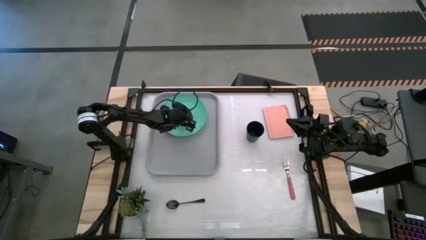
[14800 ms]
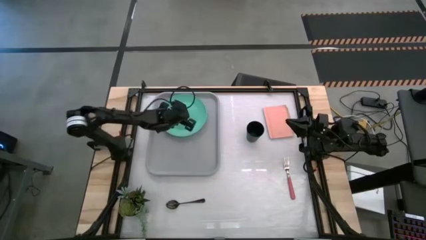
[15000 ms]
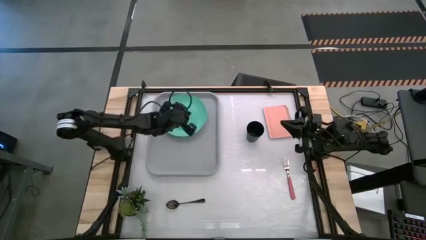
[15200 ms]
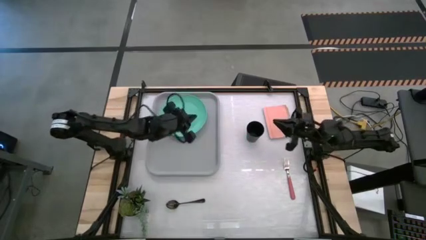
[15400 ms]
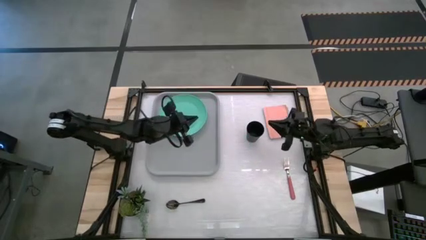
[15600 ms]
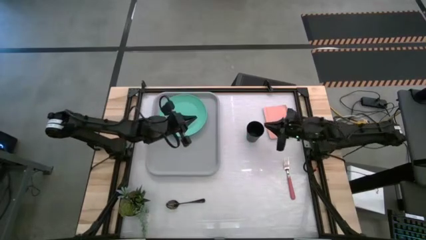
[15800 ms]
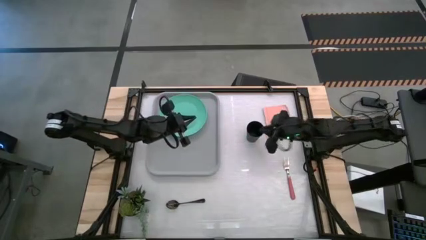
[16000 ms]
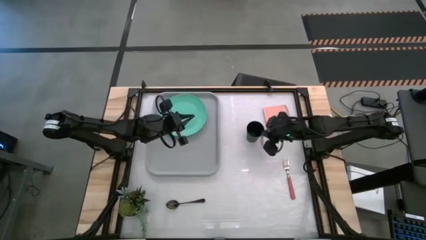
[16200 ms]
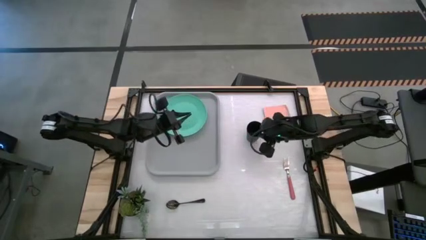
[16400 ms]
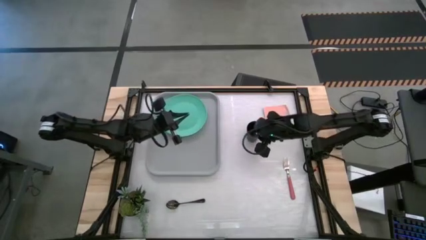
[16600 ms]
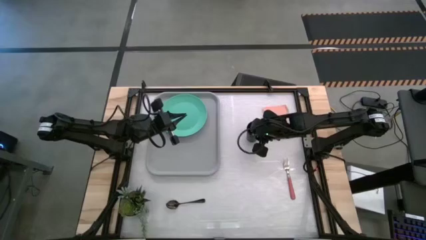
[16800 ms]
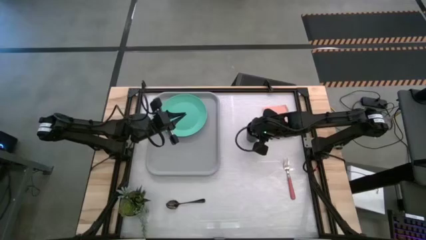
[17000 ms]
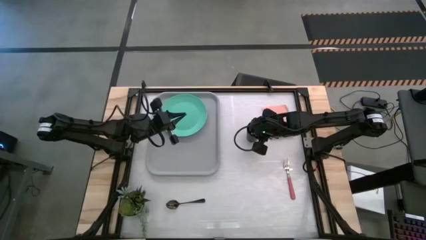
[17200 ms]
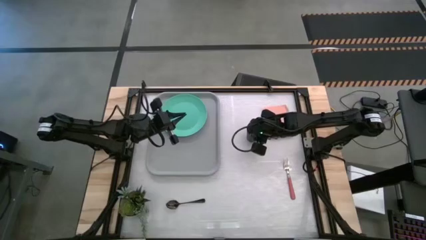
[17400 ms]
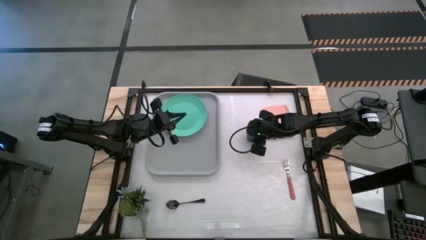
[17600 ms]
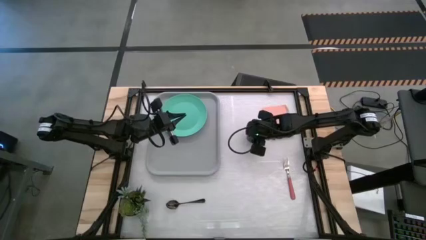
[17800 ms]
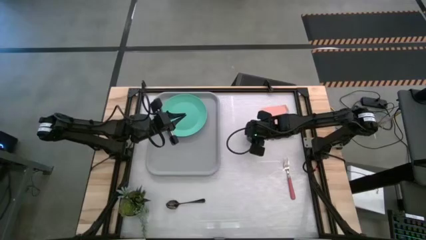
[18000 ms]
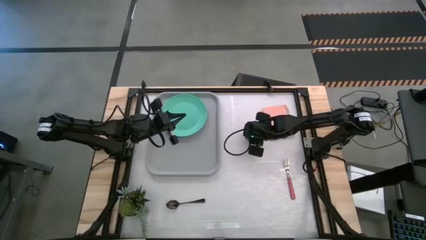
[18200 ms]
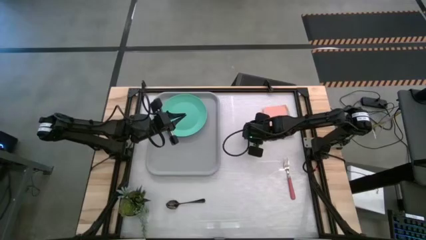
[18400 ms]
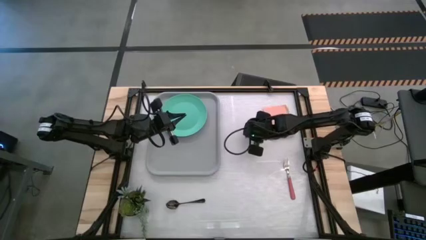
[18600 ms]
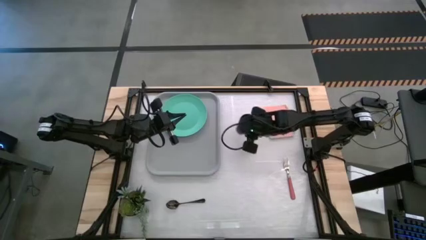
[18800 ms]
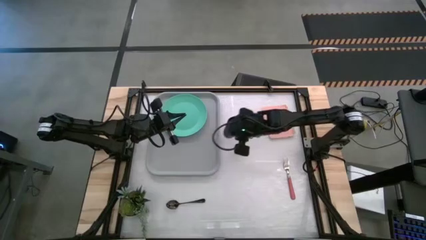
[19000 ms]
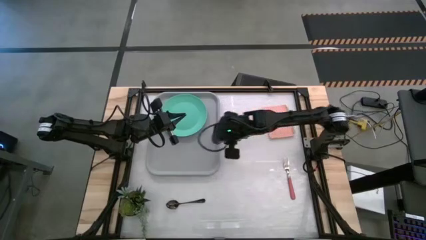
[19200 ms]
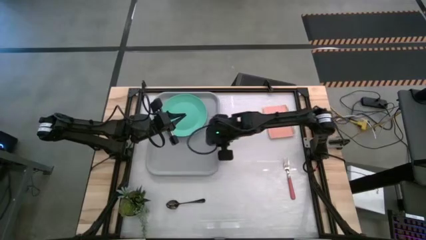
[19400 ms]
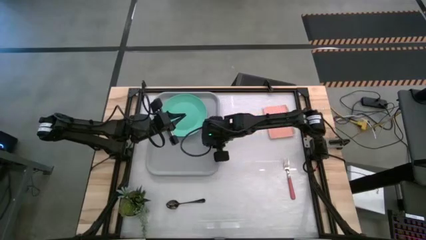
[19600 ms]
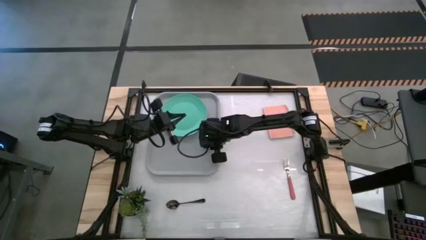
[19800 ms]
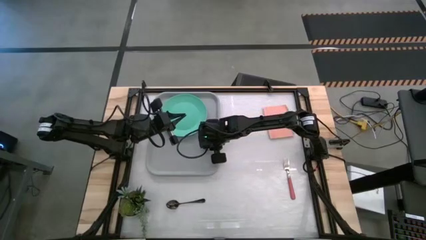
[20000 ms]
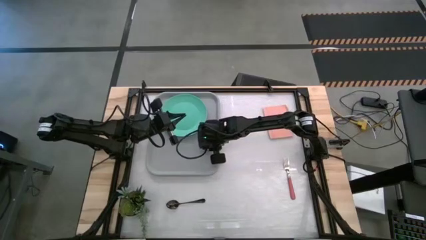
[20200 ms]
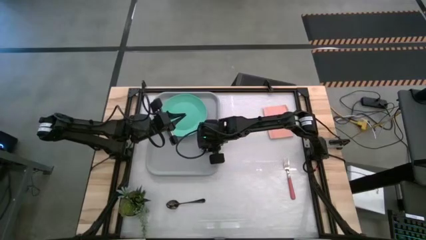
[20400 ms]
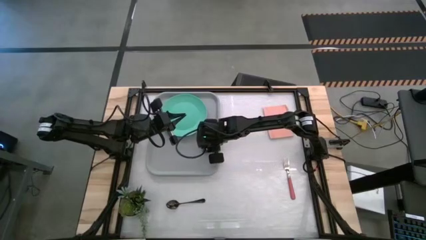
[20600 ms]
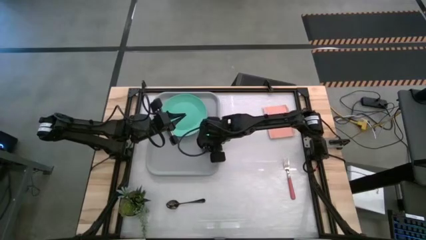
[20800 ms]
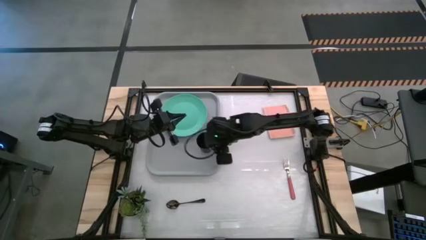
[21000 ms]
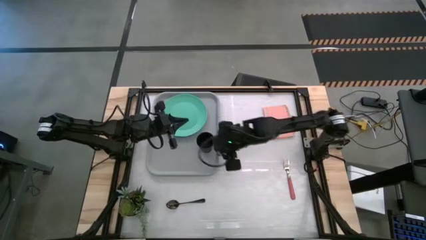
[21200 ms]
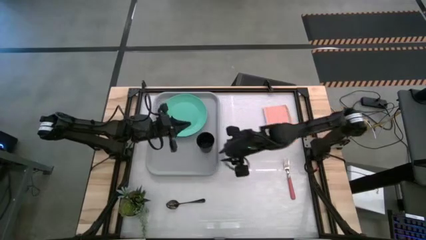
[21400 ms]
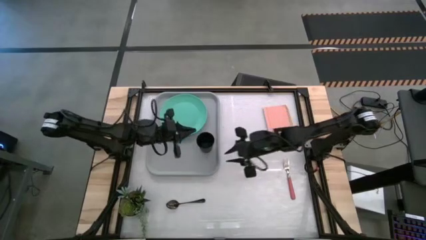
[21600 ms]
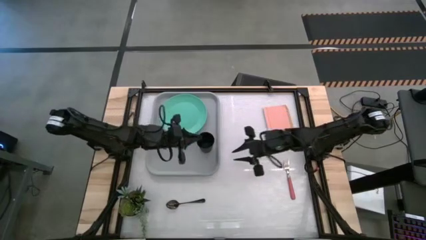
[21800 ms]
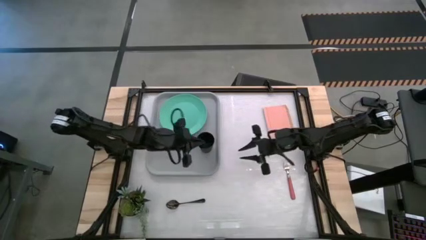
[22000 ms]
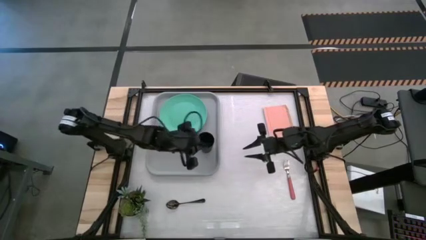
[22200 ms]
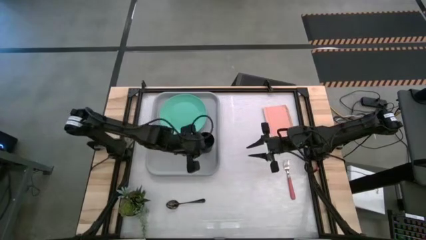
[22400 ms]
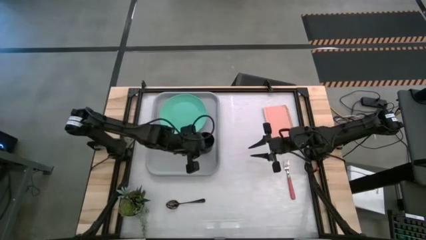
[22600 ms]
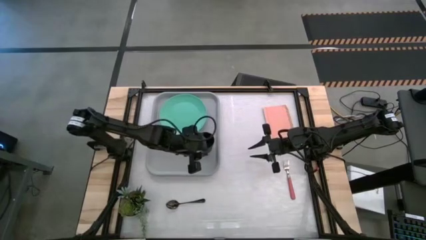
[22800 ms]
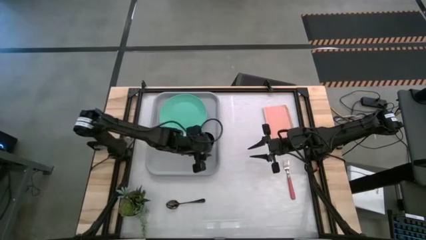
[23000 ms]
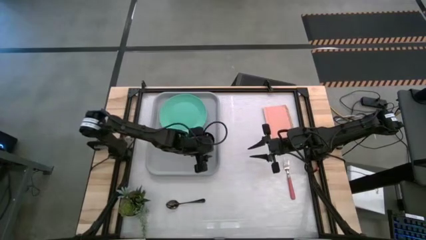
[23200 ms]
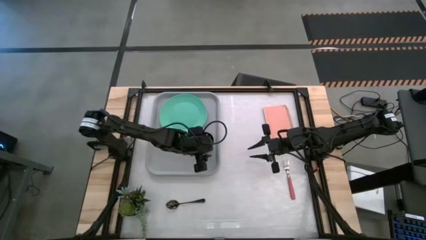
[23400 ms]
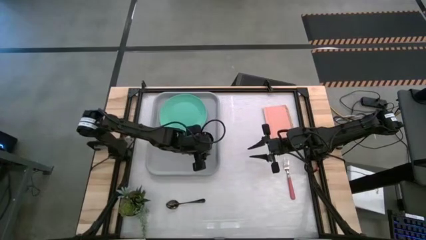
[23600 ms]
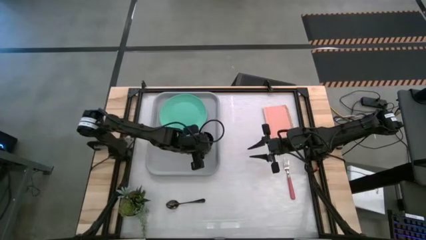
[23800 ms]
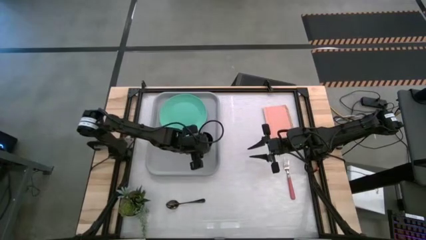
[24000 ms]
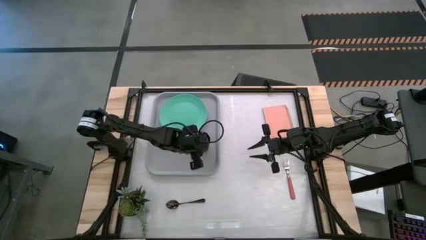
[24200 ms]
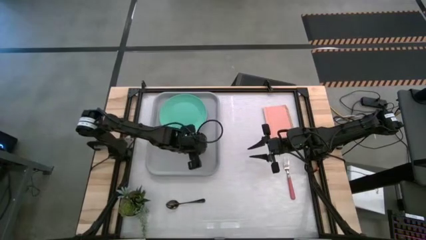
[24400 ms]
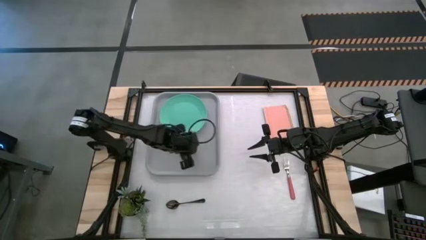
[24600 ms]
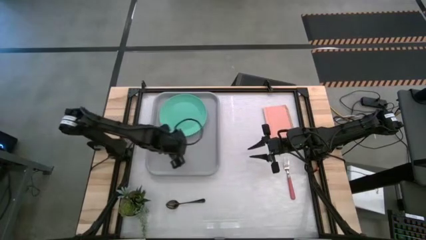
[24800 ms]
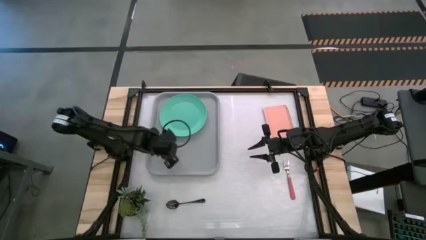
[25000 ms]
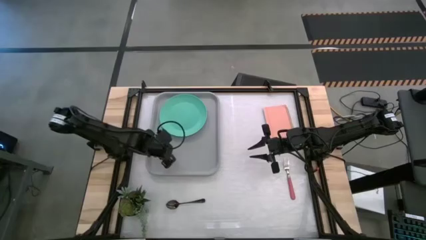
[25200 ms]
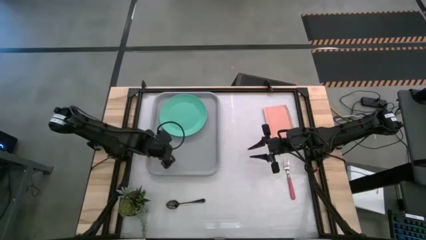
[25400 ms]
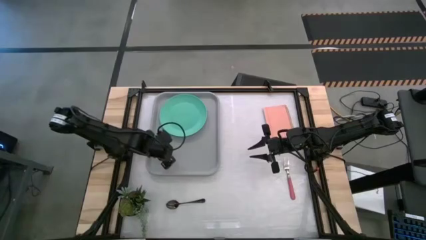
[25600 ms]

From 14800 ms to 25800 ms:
Task: Pick and place plate/cup/fork/spoon on tray
Put the black cup on the bottom side of the light green plate on the gray serving tray

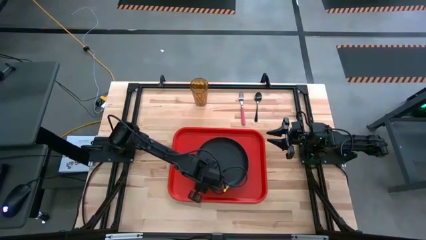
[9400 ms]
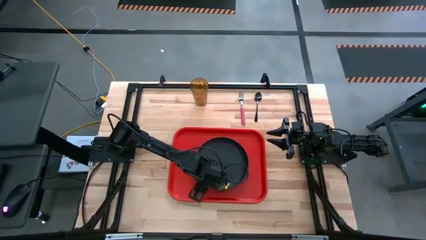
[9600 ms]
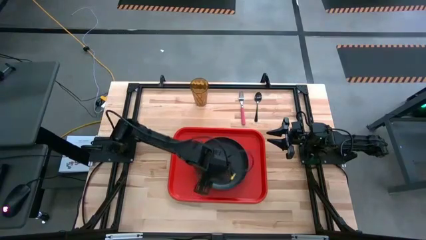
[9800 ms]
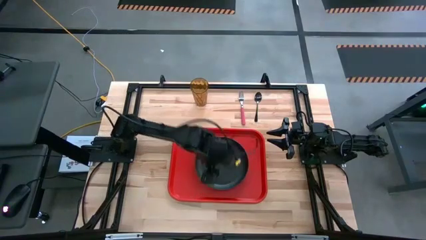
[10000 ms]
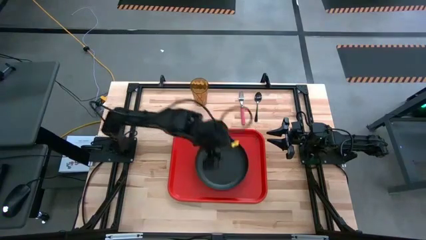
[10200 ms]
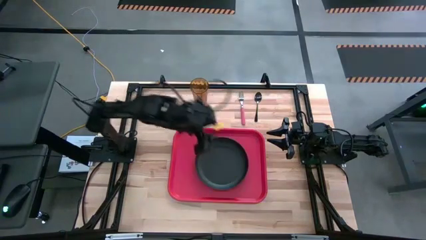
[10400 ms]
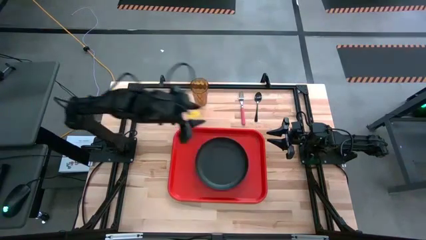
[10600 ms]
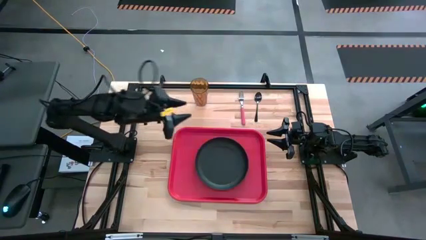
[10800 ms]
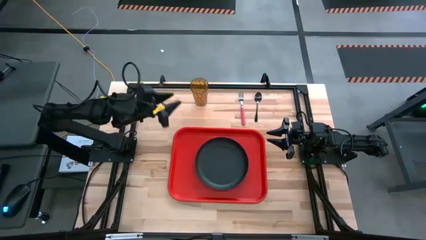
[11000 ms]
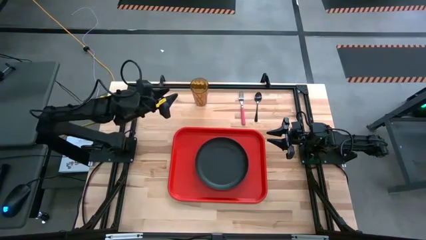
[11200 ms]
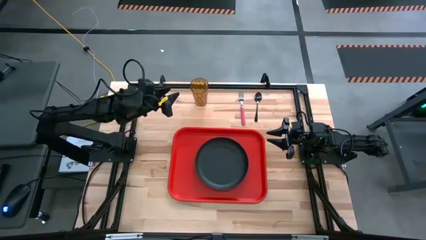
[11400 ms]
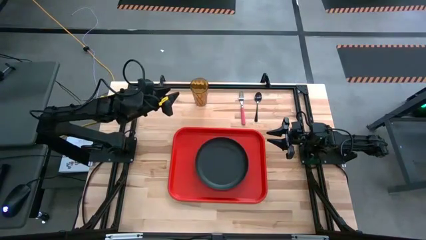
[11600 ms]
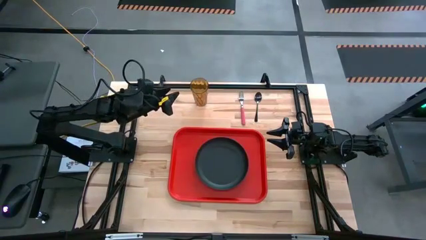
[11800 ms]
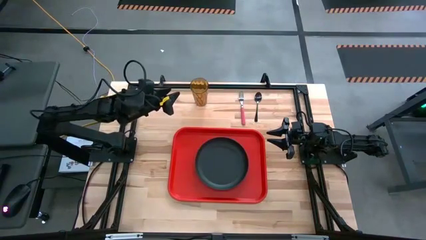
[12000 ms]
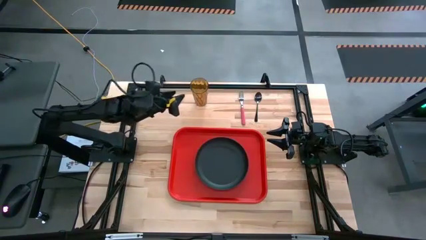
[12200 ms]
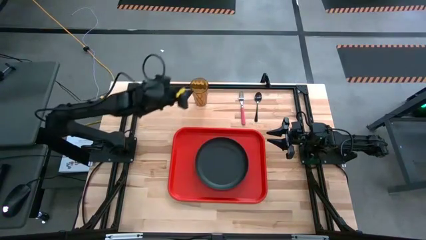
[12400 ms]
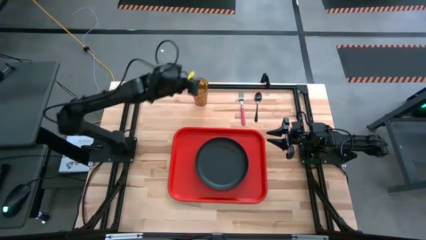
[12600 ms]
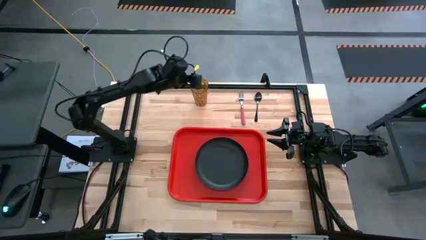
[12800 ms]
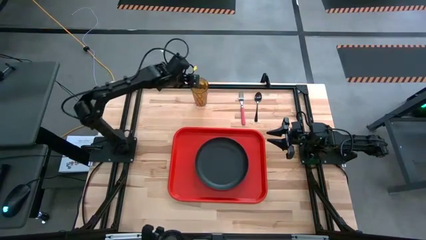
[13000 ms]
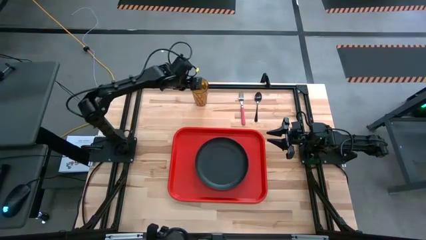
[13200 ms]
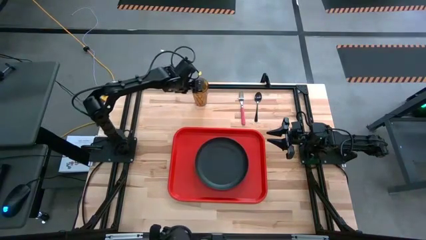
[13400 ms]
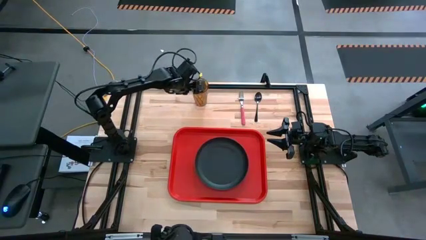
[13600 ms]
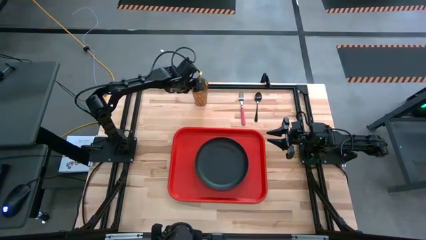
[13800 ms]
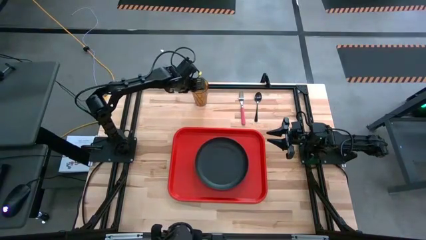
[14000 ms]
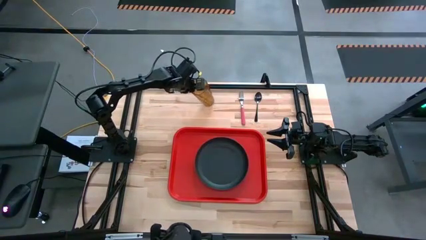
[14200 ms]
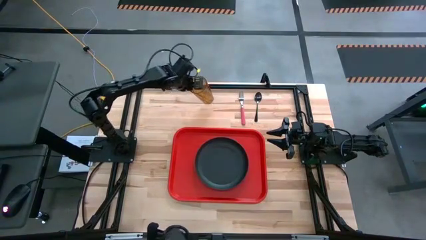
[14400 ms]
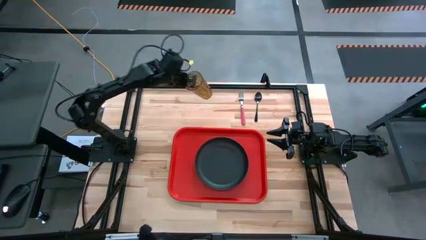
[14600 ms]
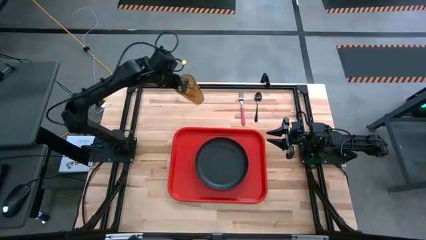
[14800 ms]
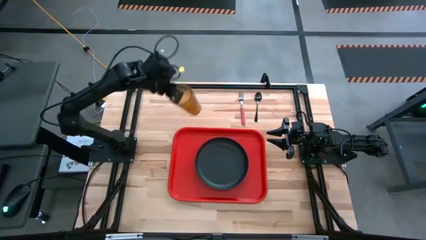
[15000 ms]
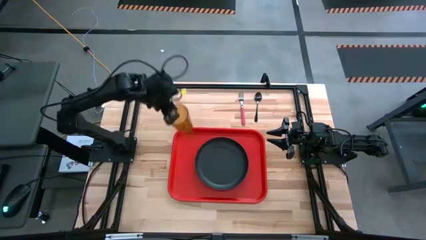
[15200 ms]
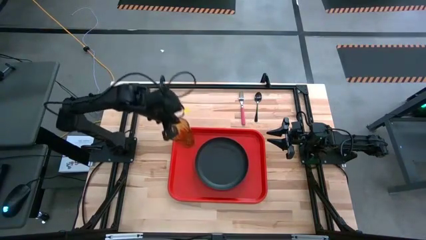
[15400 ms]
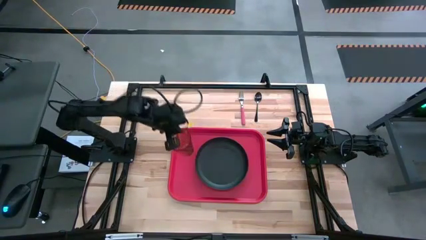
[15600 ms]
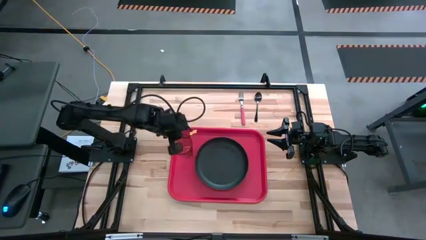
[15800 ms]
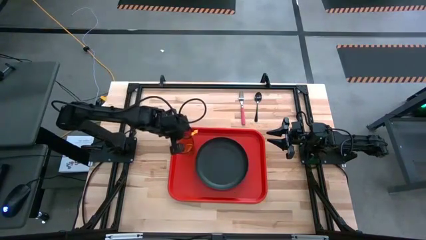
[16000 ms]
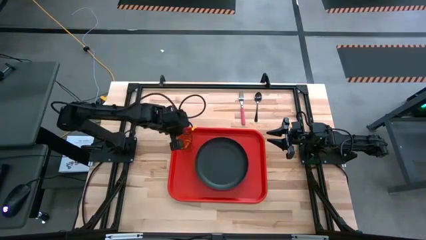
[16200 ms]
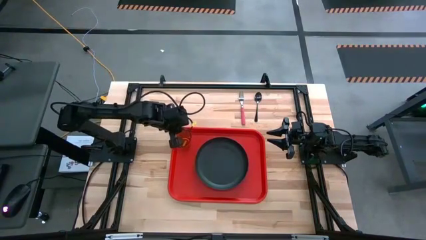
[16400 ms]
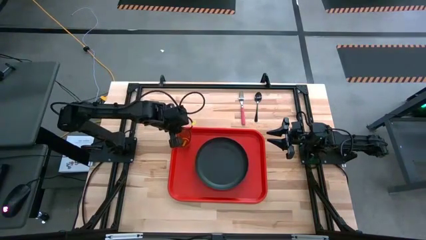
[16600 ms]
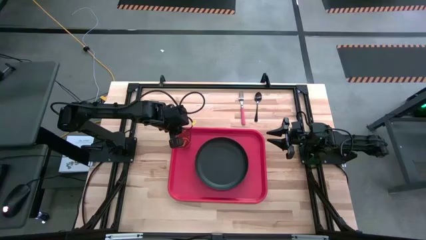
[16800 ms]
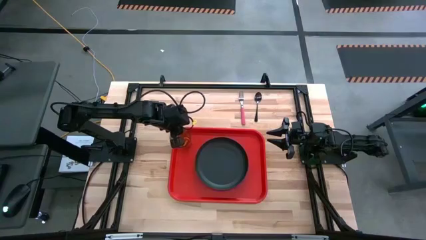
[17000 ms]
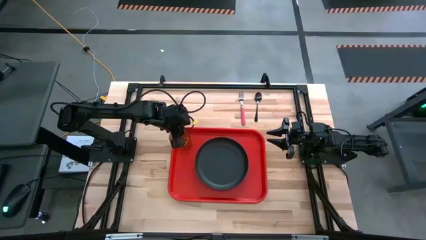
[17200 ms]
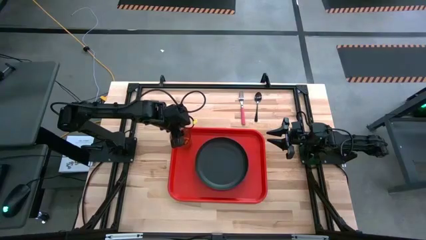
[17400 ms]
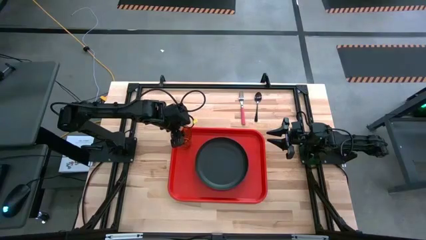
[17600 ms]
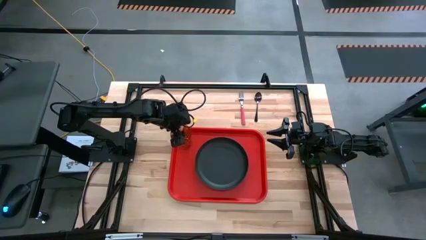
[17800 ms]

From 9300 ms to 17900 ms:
Task: Pick and place plate/cup/fork/spoon on tray
Put the orange cup on the top left side of the the black plate on the red tray
